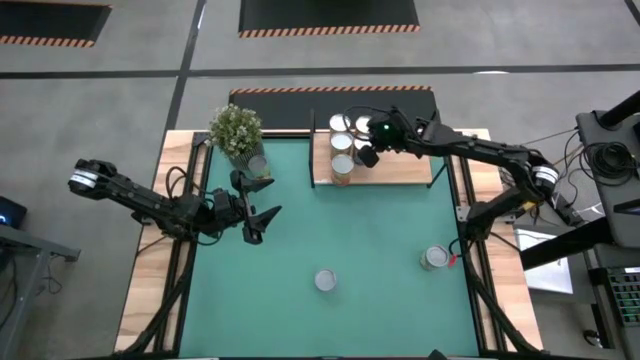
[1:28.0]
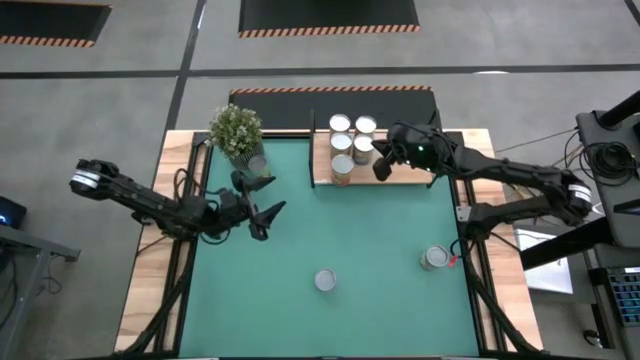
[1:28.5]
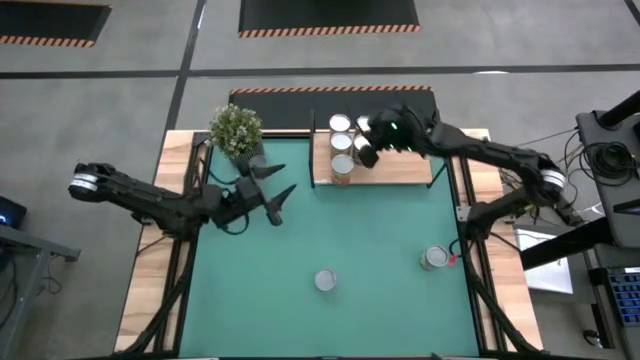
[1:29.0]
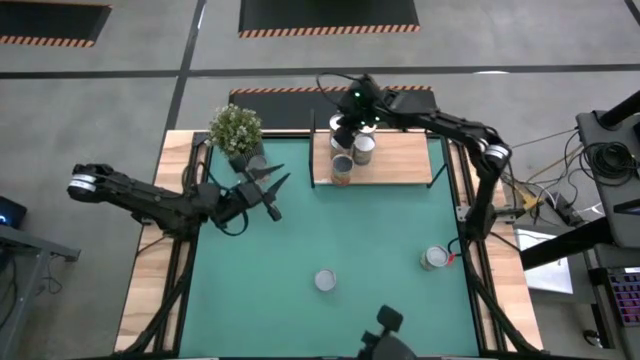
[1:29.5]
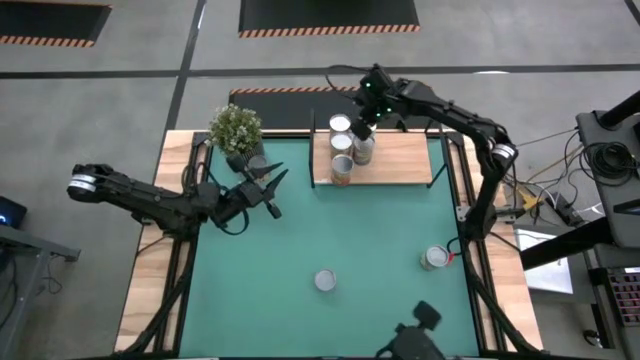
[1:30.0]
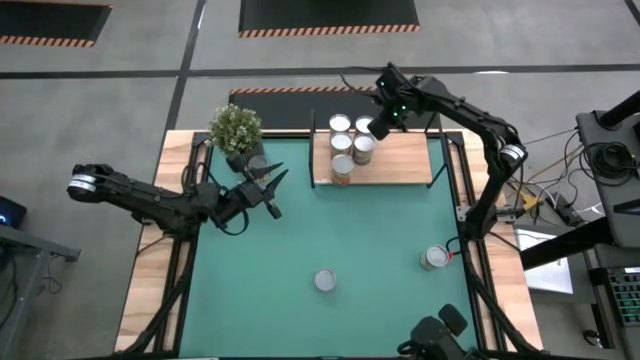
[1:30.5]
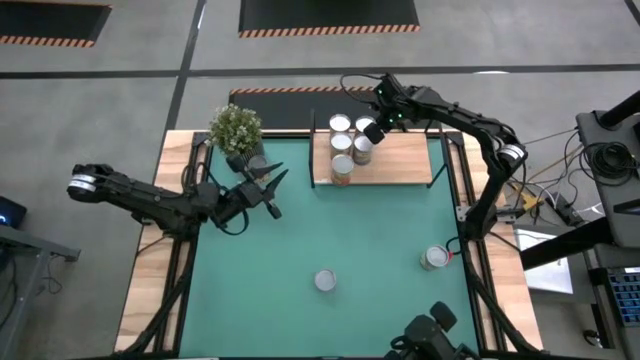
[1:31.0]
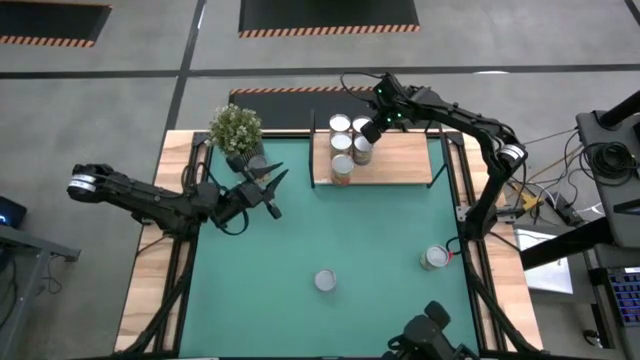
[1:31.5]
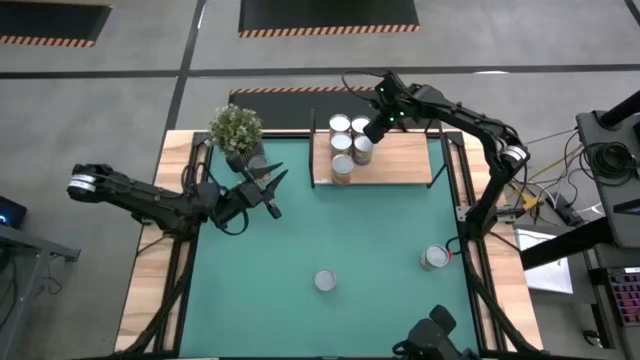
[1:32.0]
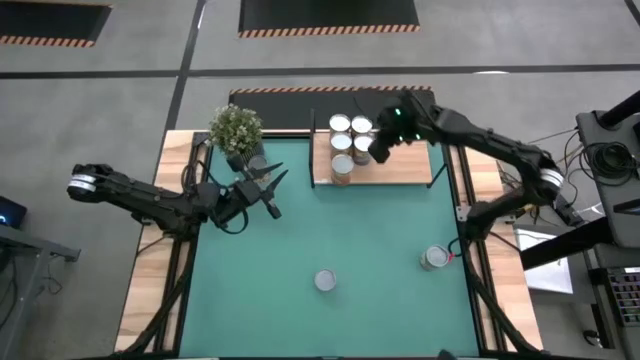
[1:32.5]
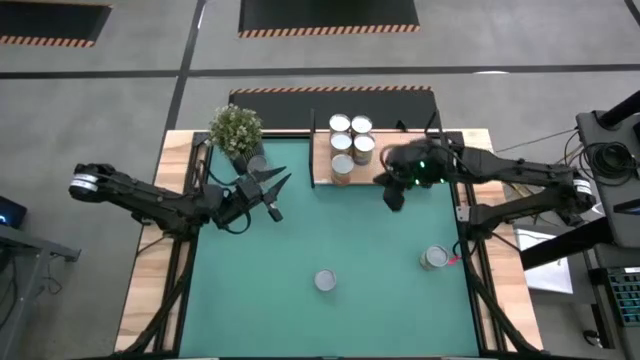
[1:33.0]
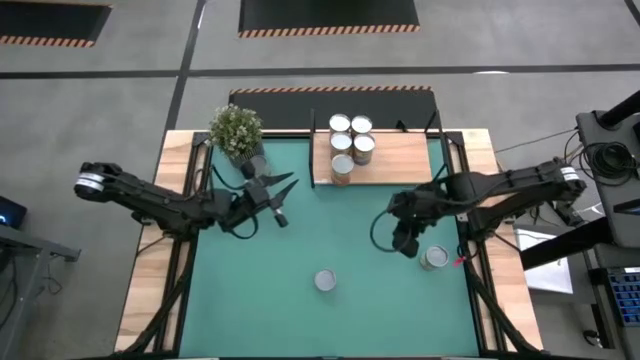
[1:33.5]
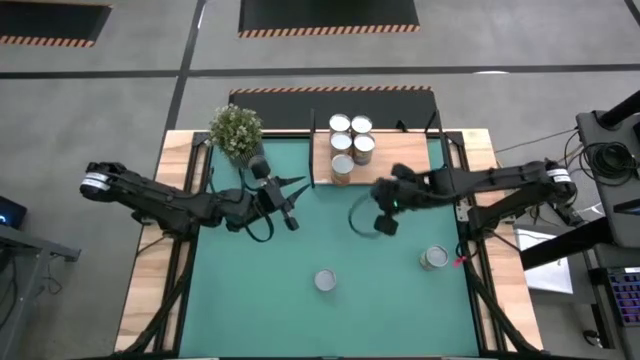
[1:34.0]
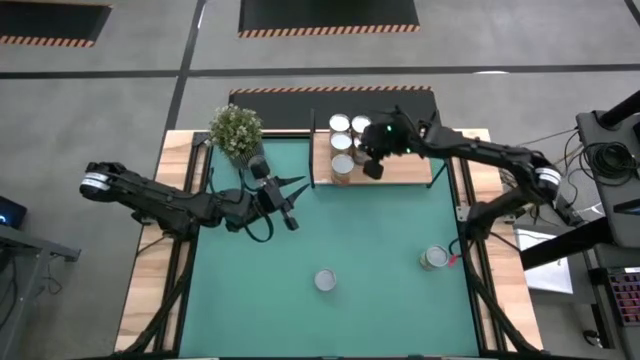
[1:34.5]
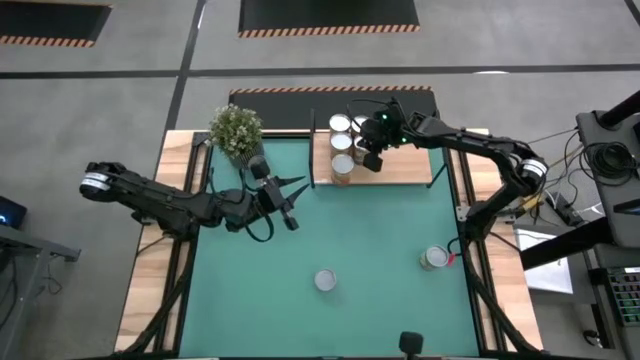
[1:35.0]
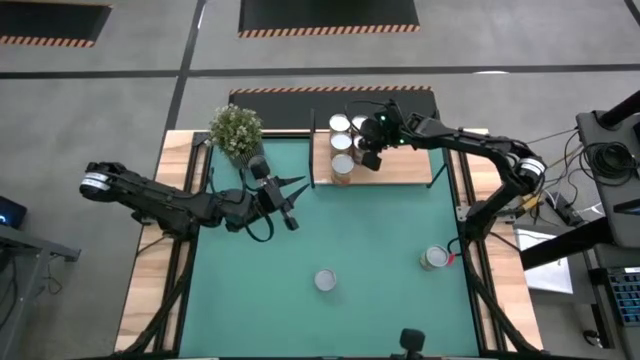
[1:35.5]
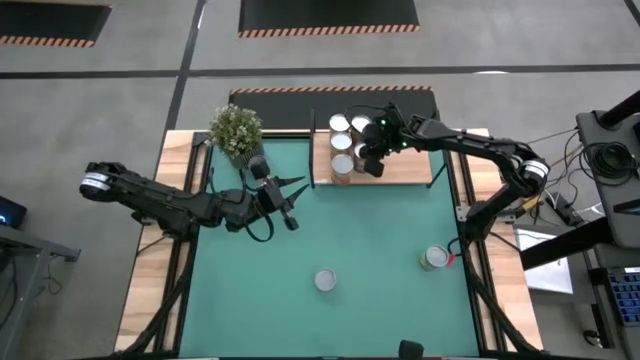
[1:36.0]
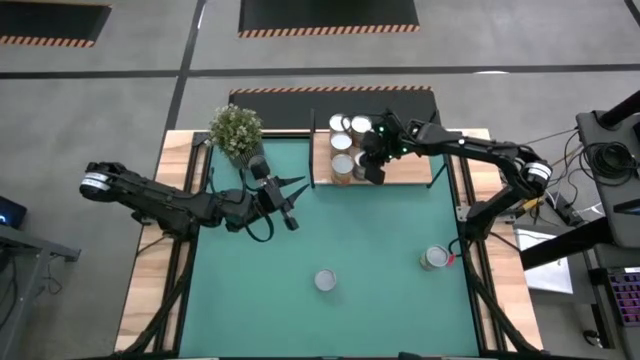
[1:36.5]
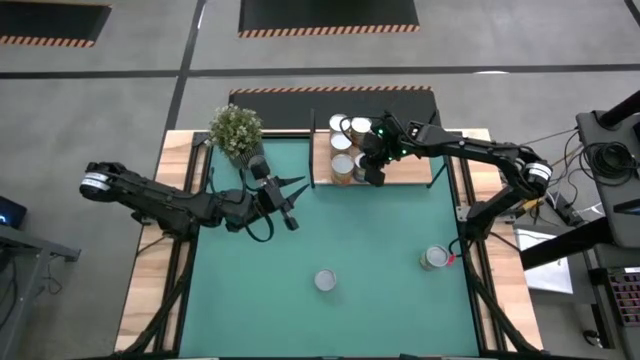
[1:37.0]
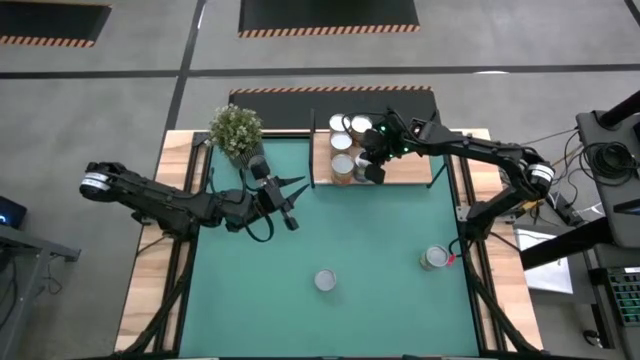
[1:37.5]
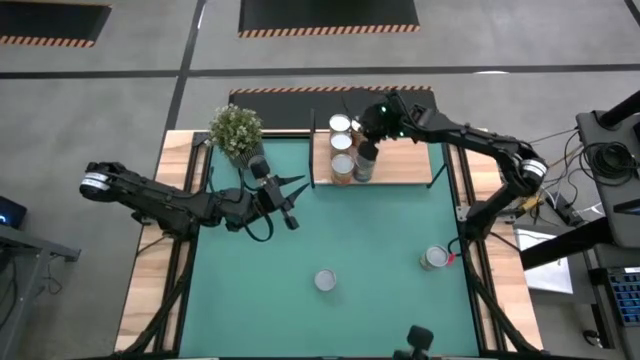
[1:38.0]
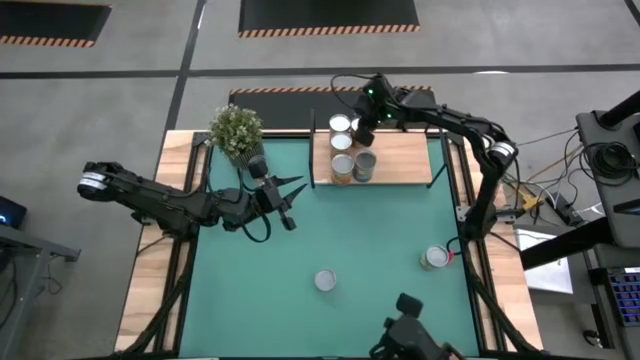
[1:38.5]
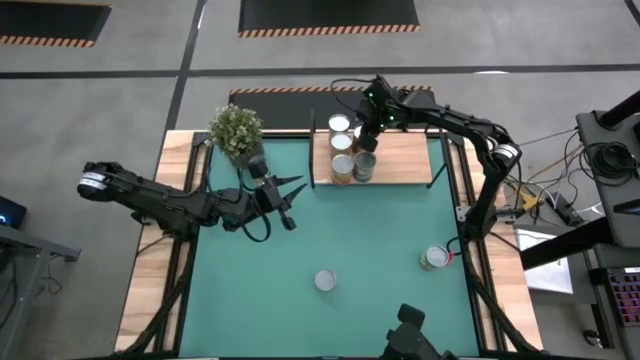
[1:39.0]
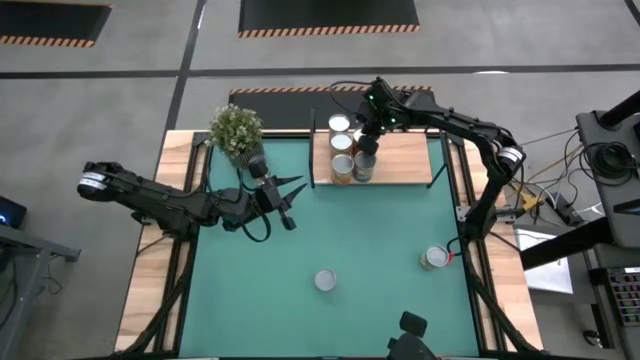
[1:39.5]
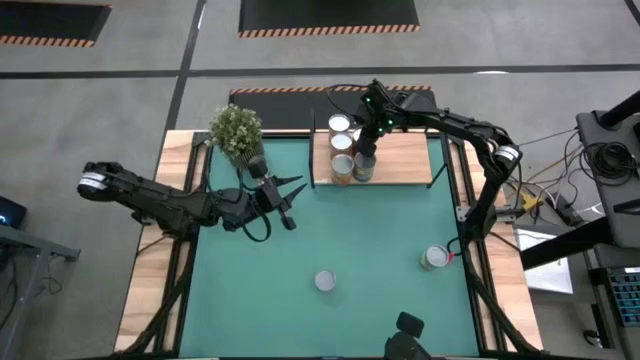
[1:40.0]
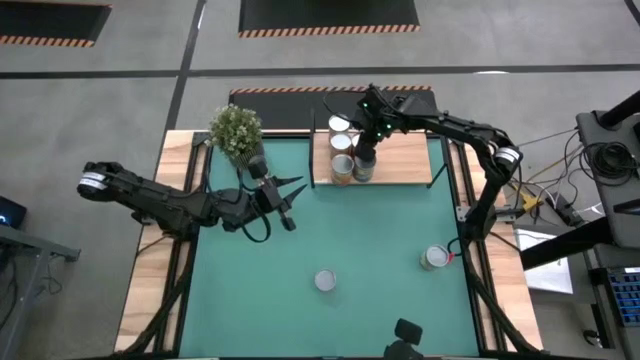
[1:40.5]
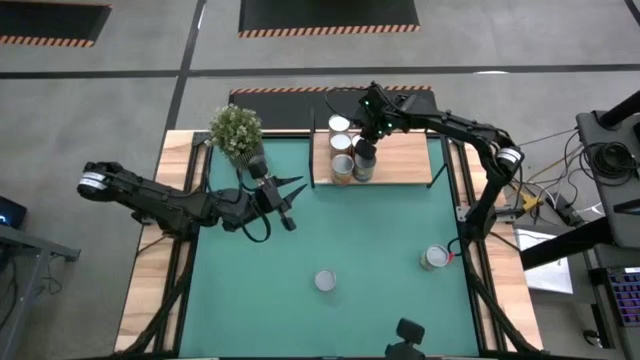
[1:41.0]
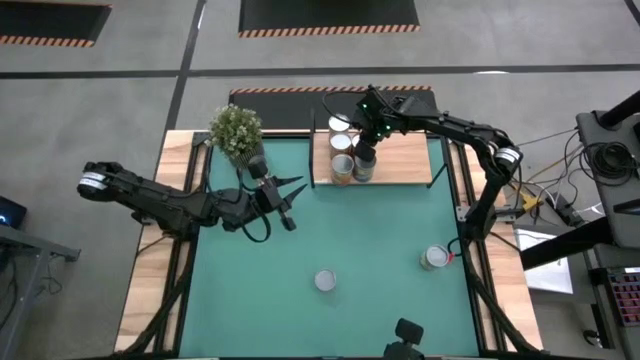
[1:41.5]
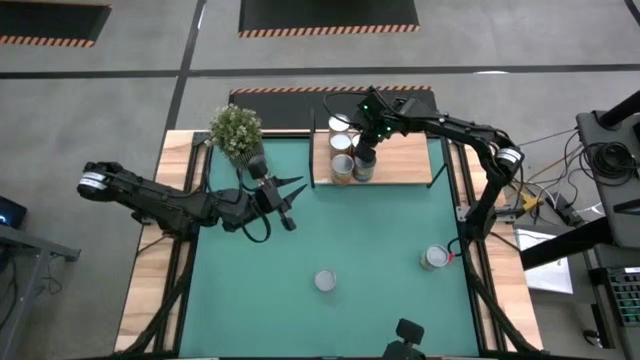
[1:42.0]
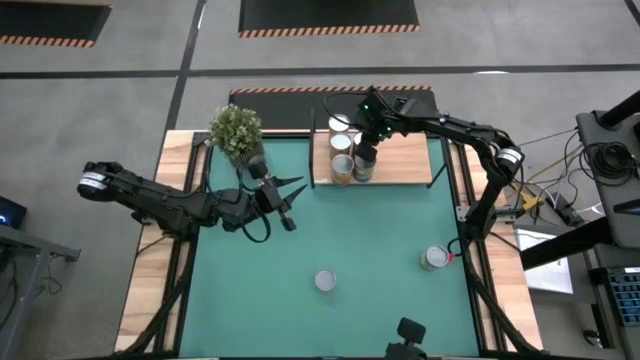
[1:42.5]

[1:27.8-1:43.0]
Task: Pick and place cans onto a shelf
Adjust the orange cans

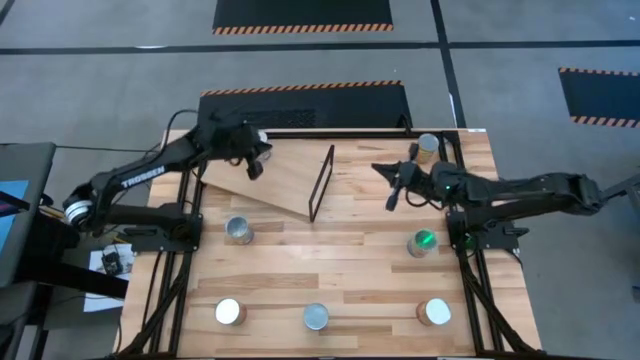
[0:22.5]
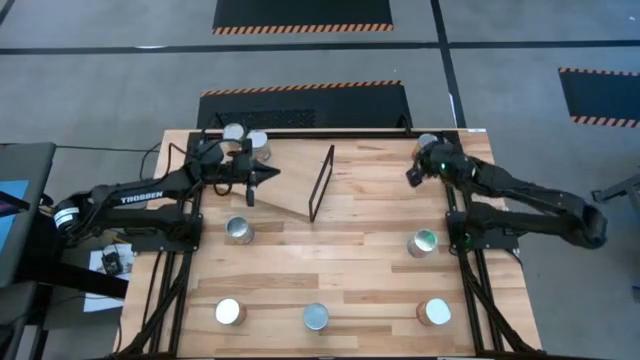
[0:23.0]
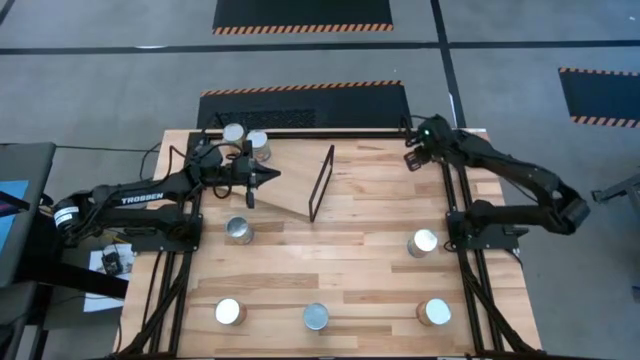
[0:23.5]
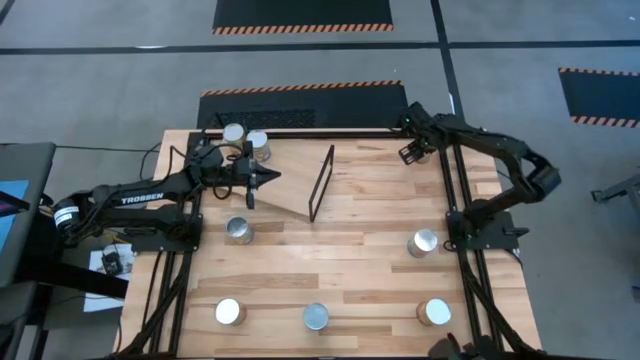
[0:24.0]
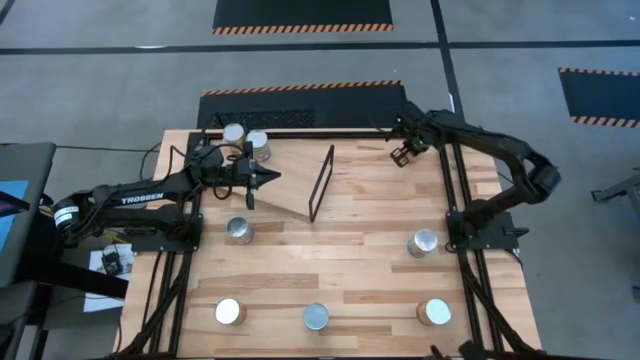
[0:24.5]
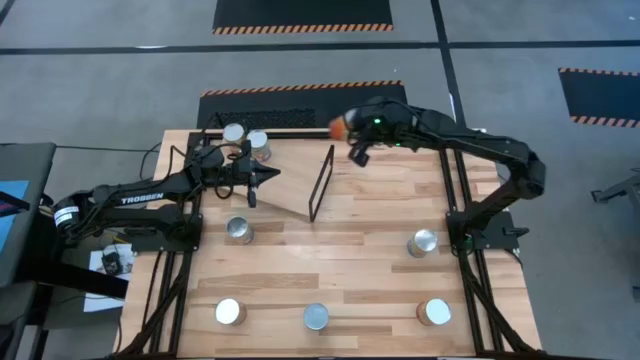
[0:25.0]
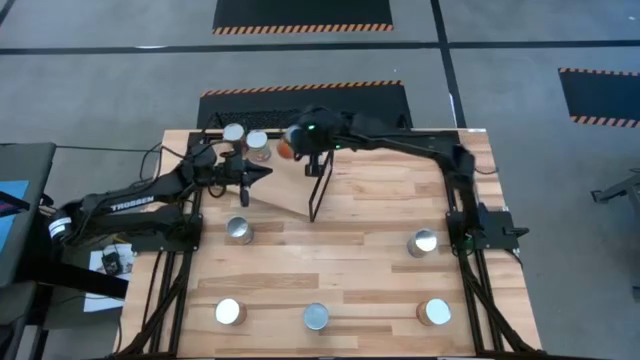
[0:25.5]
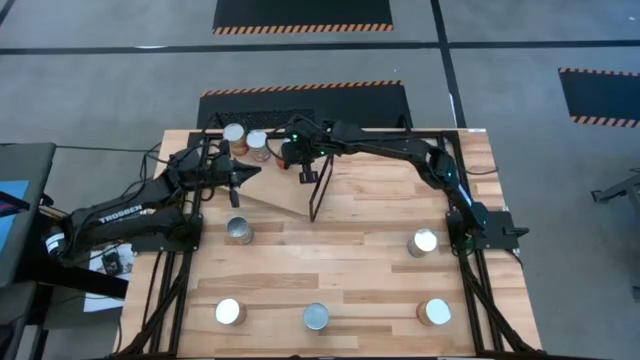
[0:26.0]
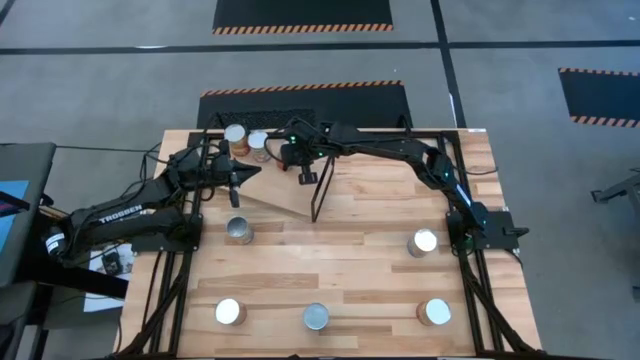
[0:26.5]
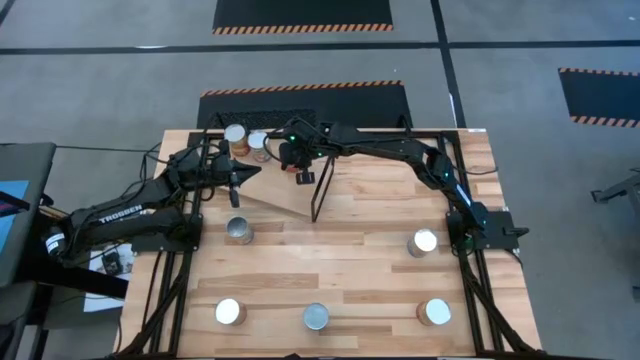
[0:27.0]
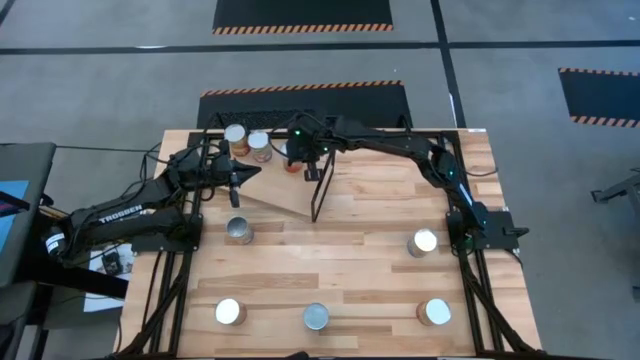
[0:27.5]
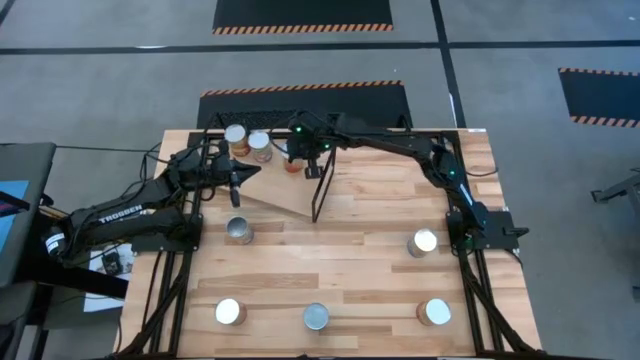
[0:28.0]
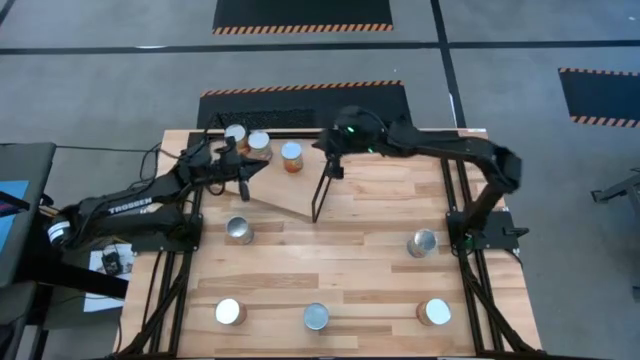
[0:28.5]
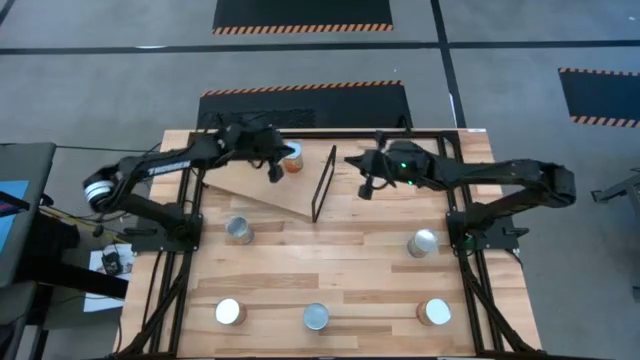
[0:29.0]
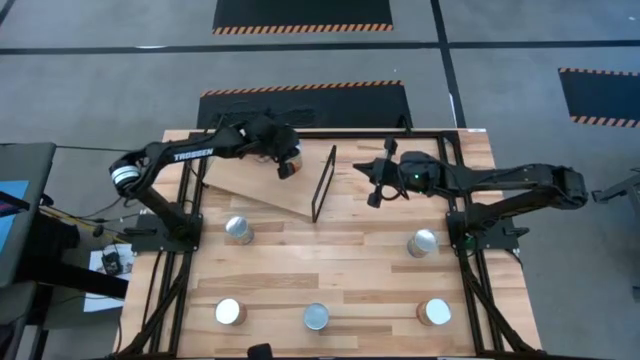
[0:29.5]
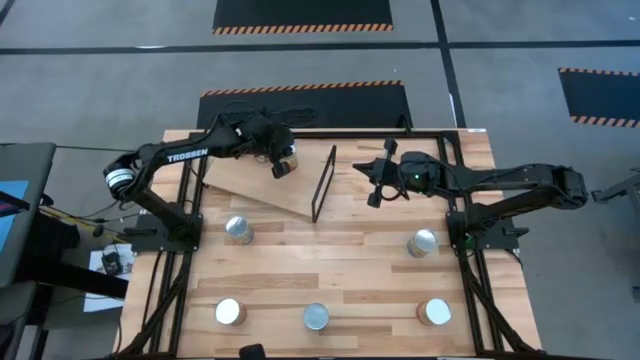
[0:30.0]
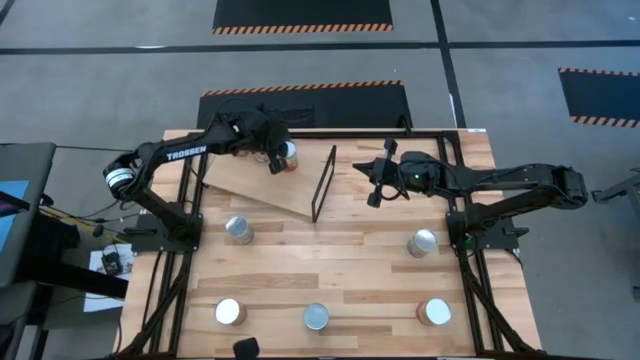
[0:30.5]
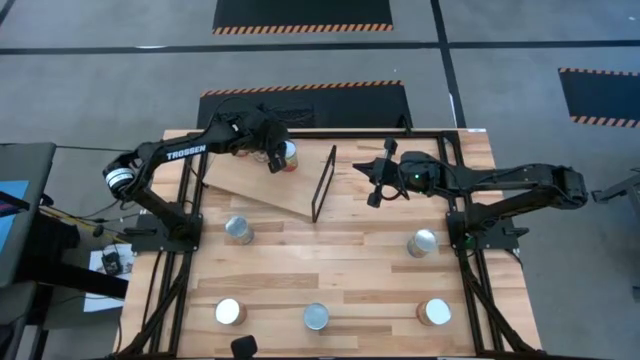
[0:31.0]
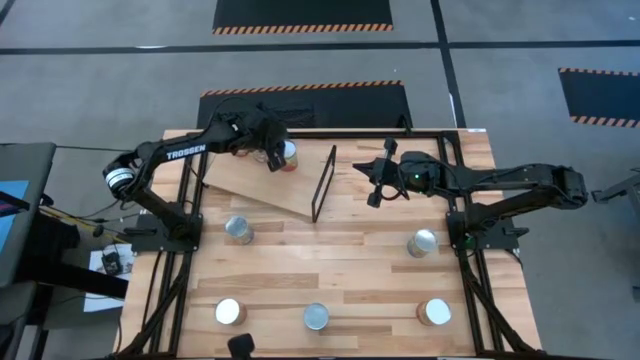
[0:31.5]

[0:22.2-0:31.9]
Task: Pick and place cans onto a shelf
Put the top canned green beans on the shelf
